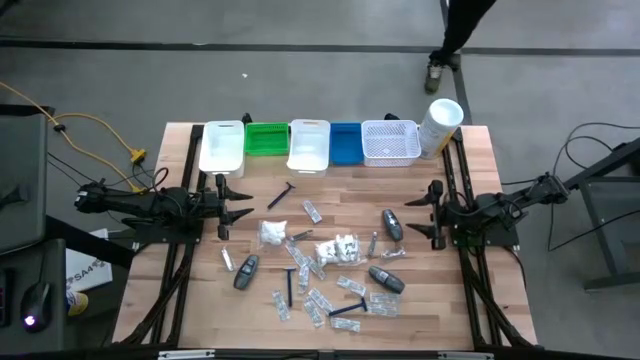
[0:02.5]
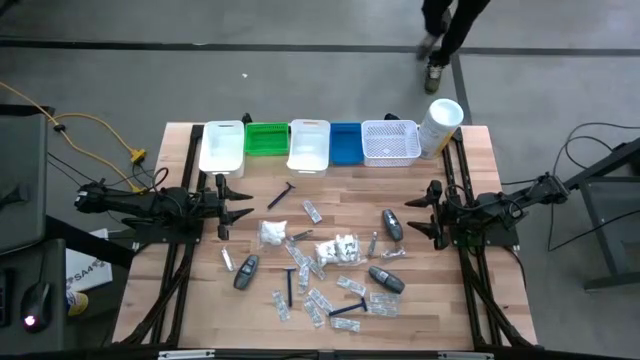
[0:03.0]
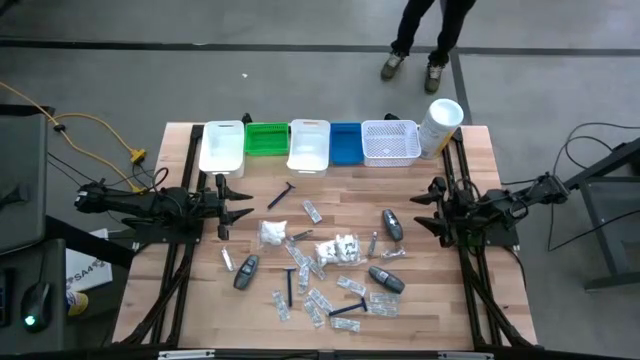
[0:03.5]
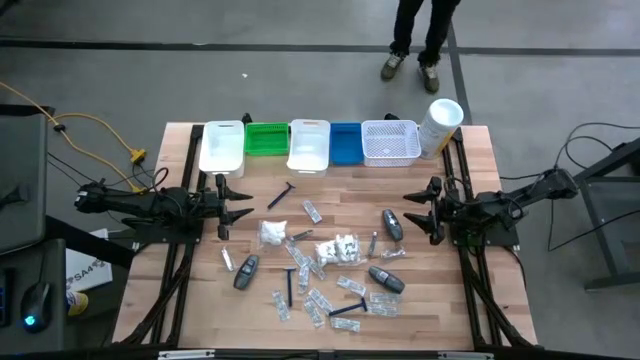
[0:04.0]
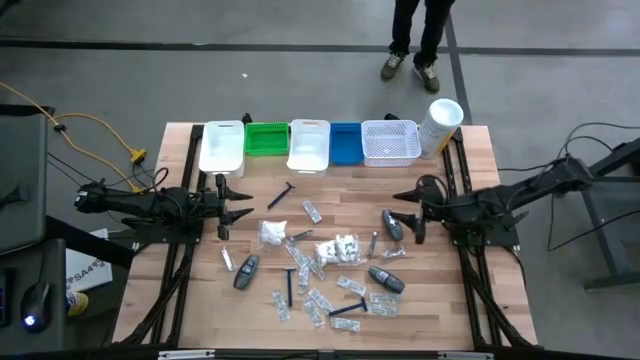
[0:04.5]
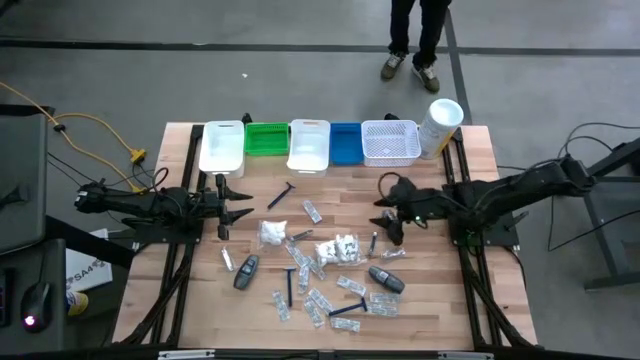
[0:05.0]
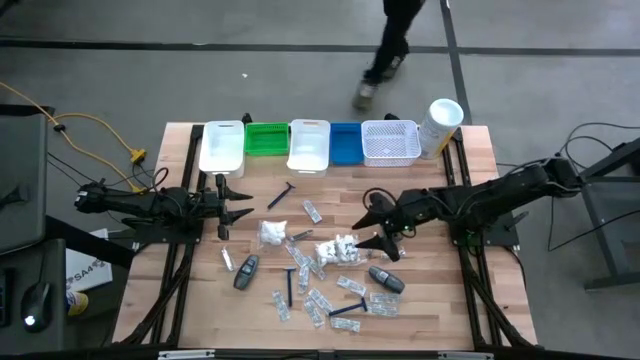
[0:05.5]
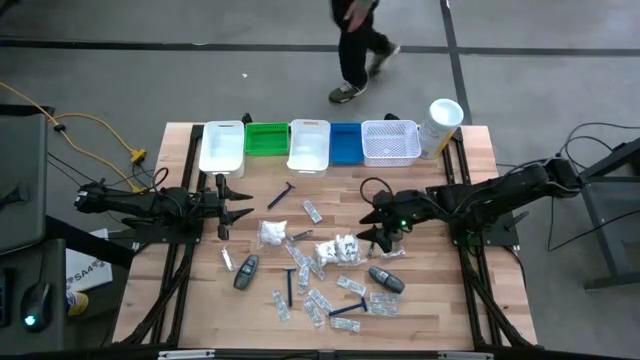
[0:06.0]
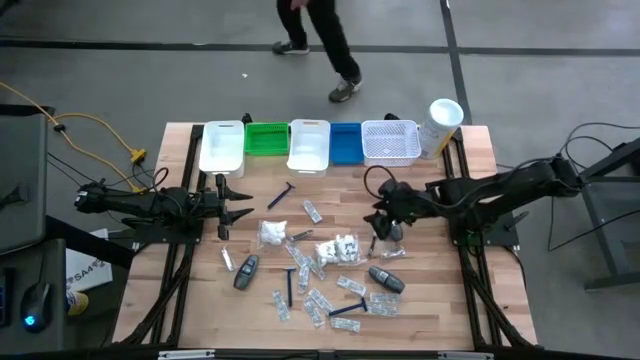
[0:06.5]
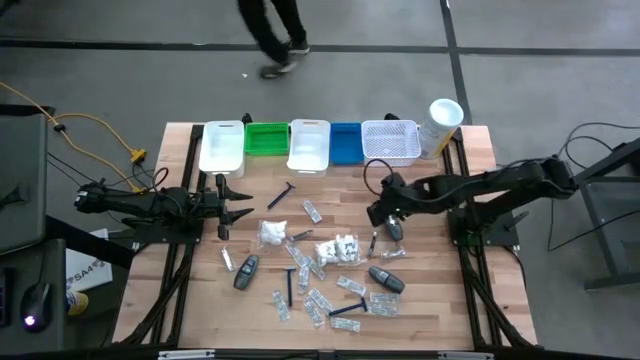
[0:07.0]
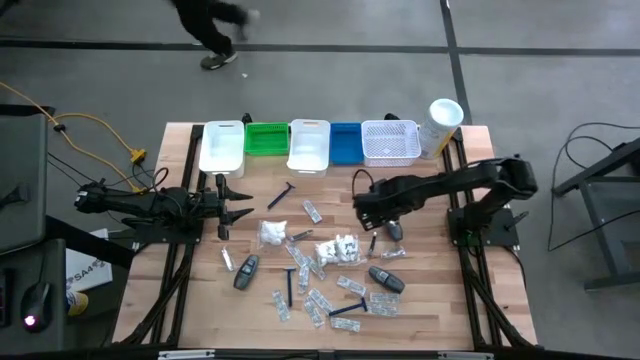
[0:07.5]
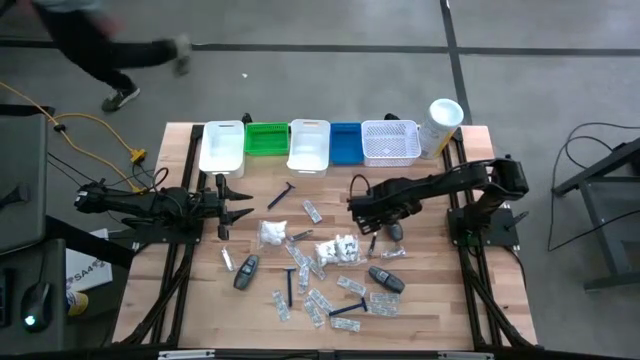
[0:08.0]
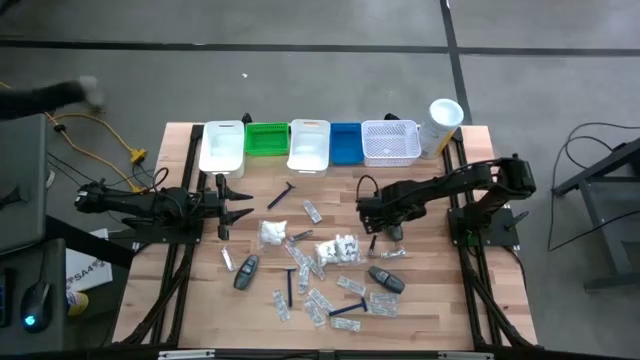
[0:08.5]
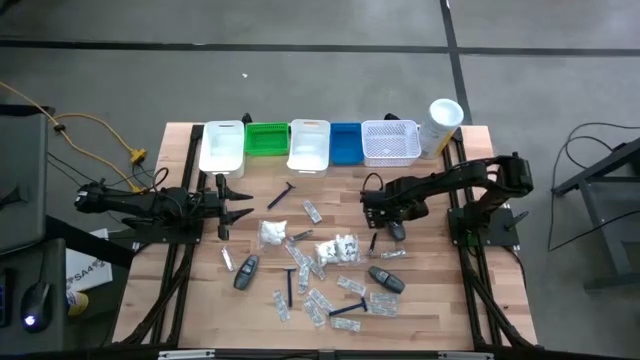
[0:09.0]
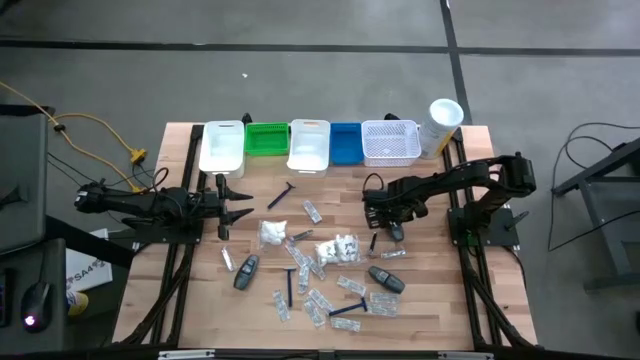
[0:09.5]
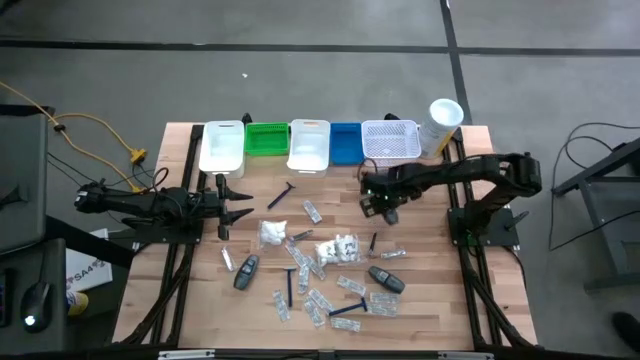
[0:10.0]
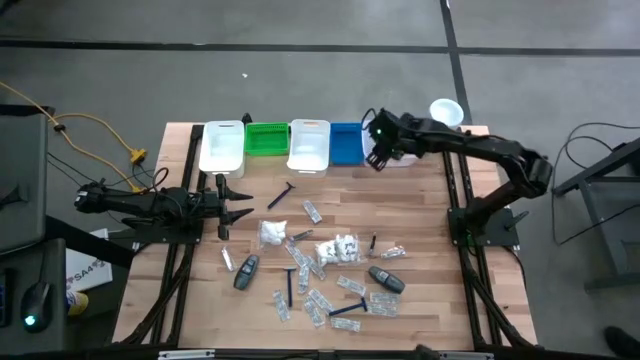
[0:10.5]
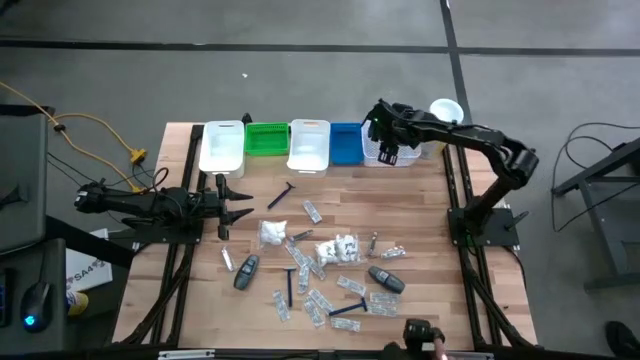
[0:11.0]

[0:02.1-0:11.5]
Task: Pick & Place Travel size toiletries
Put the black deodorant into the right white bin

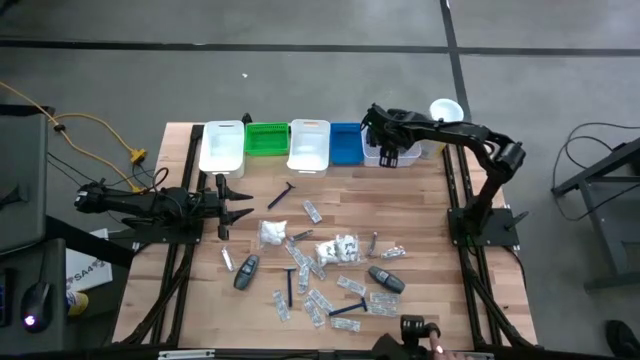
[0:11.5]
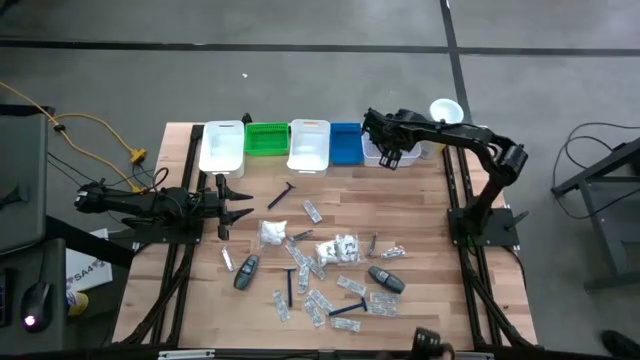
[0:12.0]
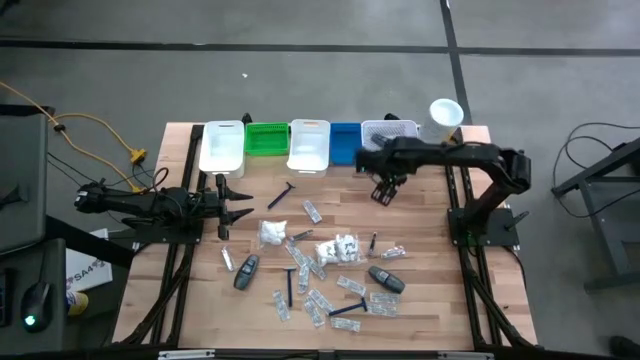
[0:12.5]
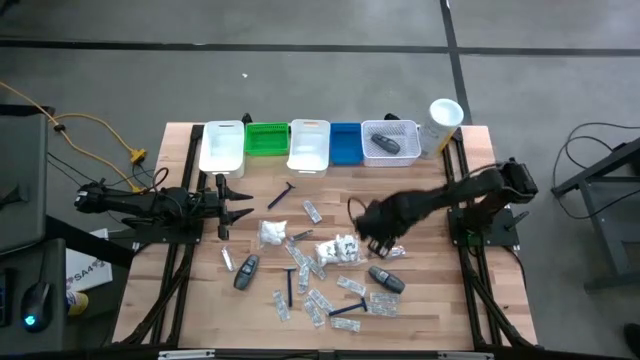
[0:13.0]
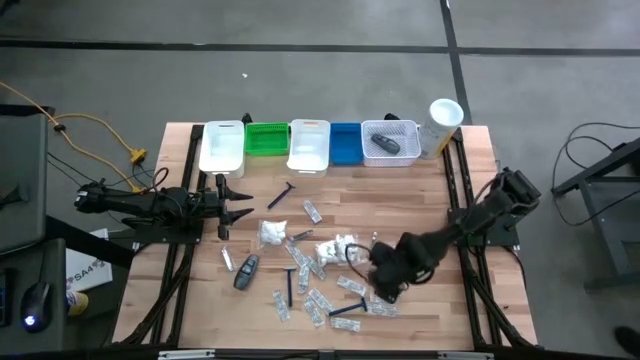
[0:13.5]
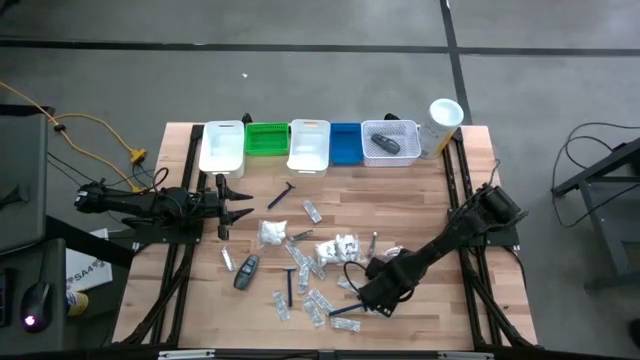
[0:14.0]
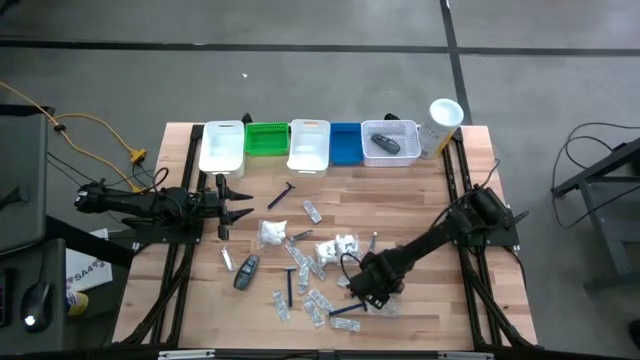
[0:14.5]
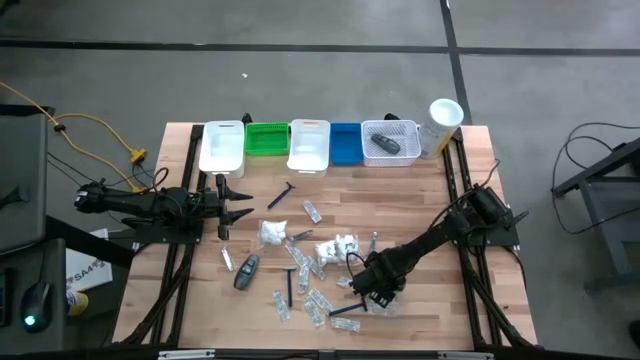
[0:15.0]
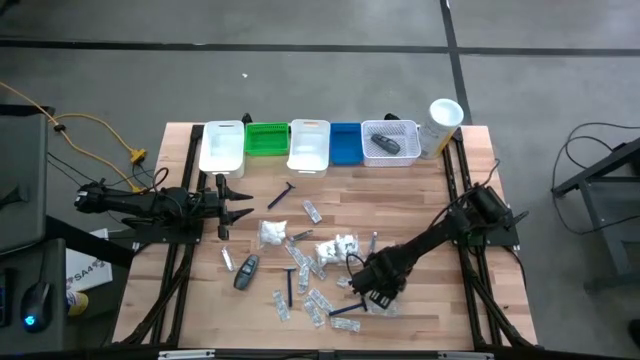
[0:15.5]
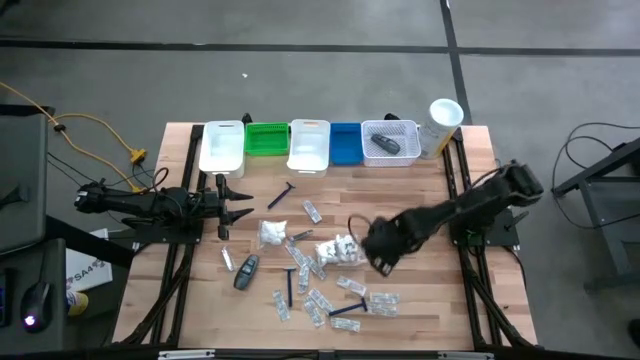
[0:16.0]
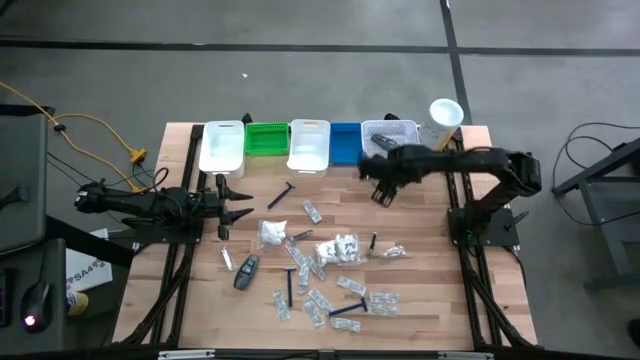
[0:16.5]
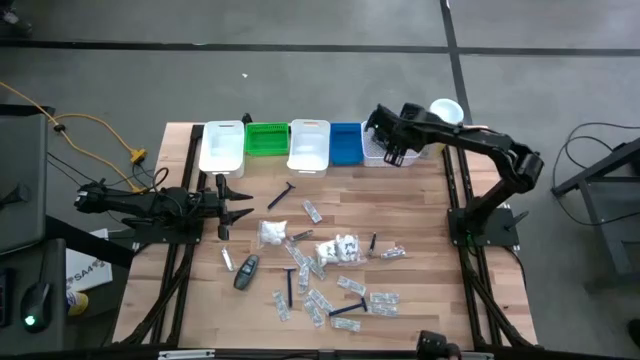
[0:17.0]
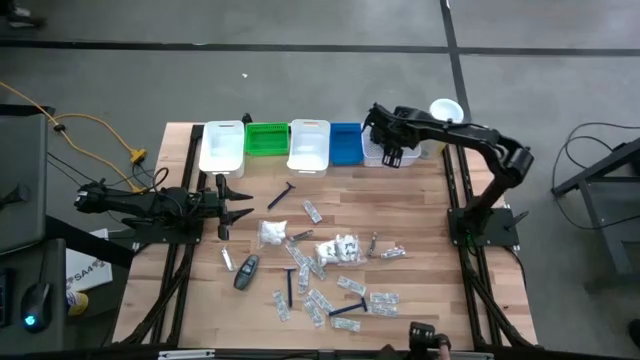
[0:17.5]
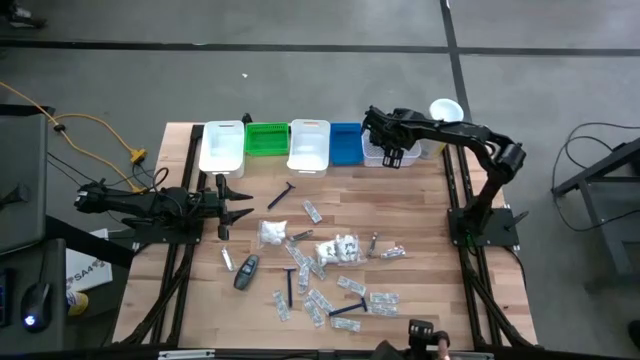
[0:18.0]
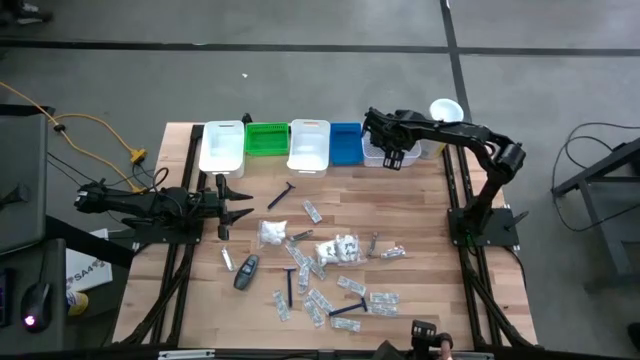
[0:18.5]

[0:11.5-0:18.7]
Put the black deodorant into the right white bin

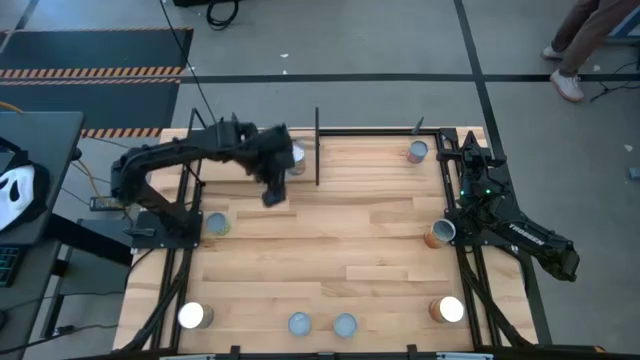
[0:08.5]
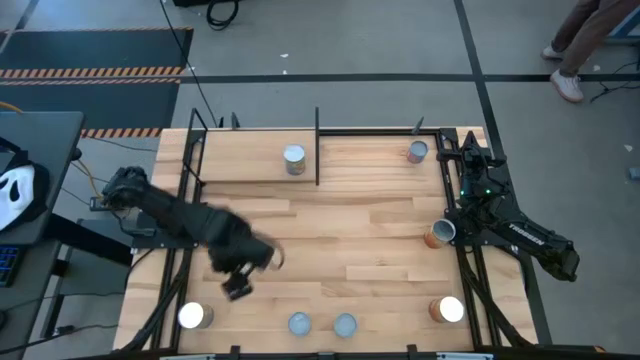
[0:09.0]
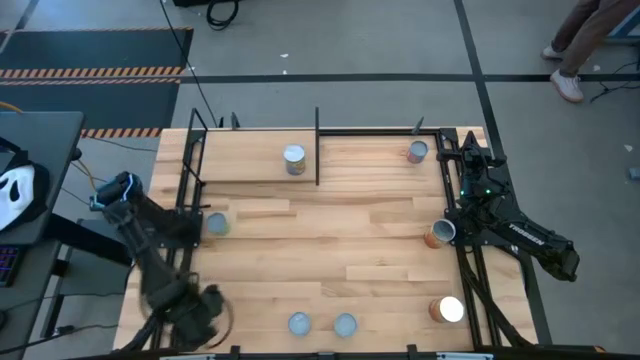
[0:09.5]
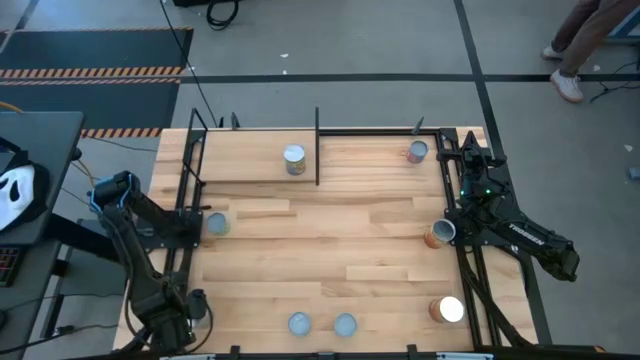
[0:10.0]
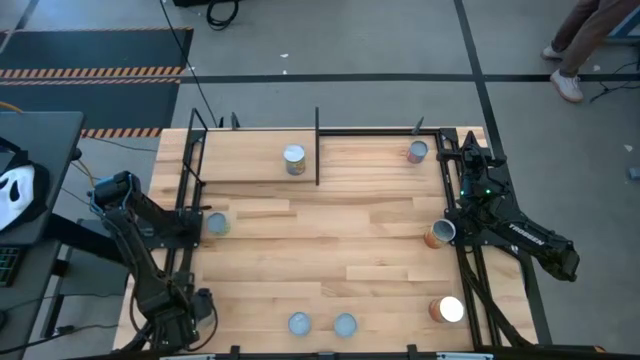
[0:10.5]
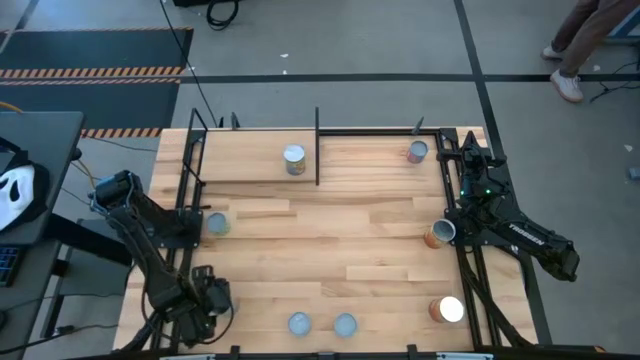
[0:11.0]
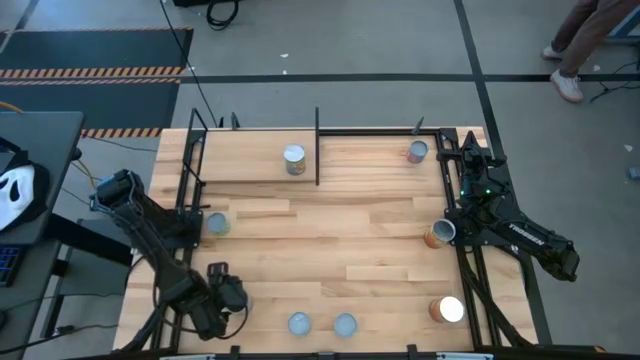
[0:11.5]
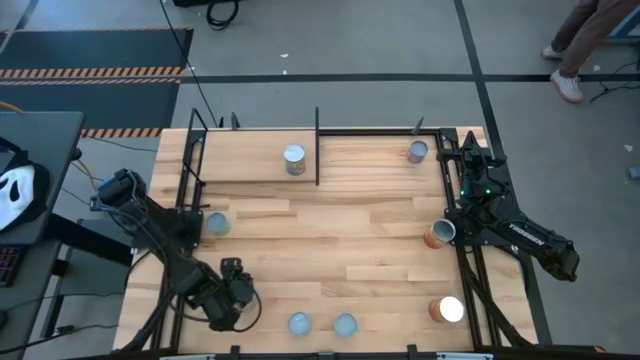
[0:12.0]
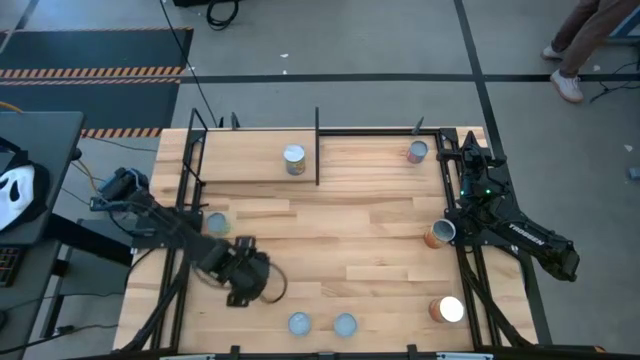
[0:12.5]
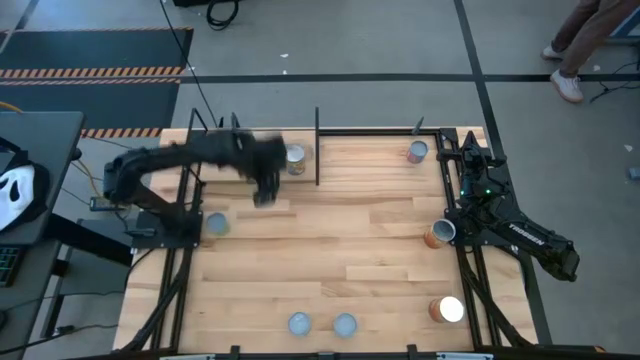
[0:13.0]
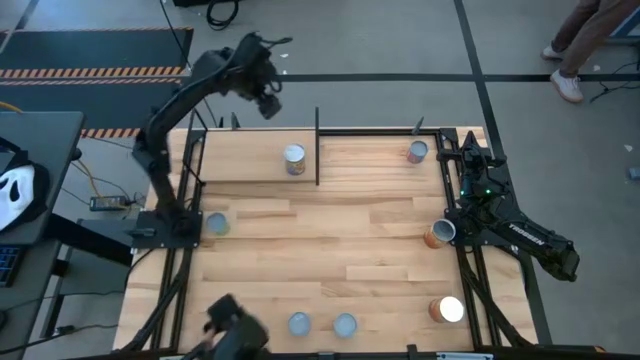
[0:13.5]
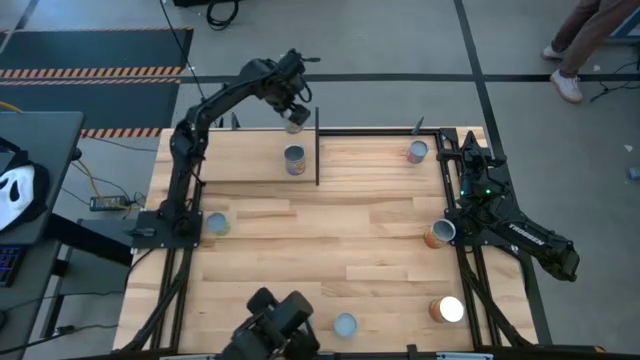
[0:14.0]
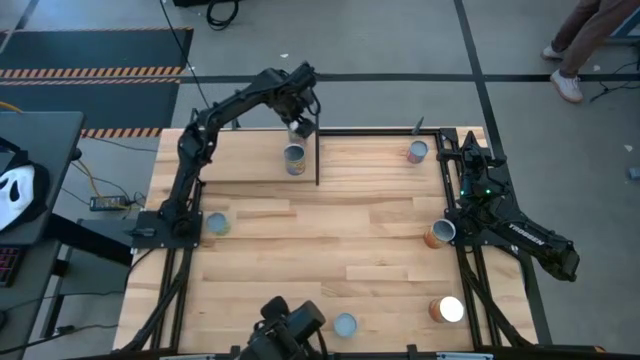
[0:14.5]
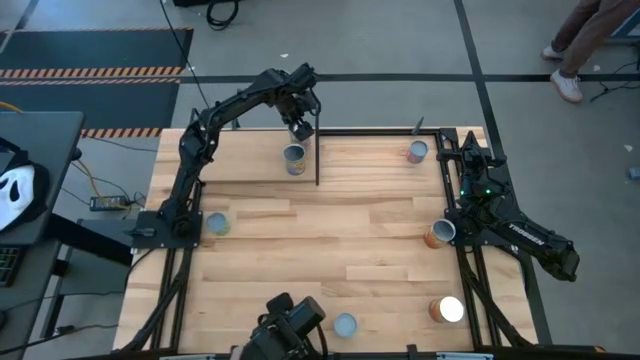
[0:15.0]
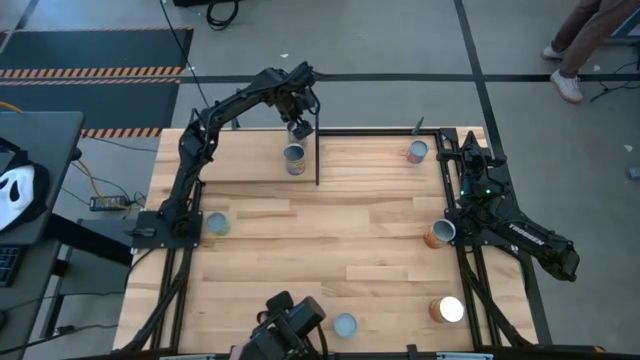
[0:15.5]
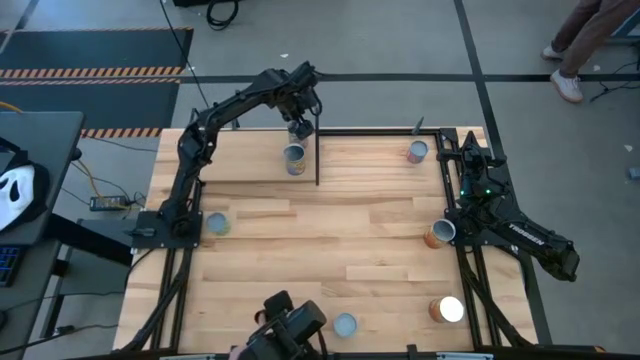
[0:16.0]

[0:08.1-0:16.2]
Task: Pick and place cans onto a shelf
Put the can of peaches on the shelf
